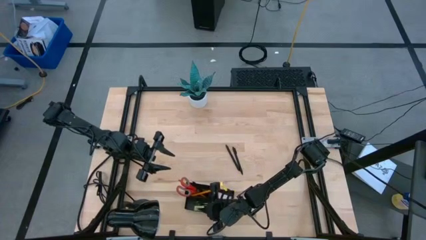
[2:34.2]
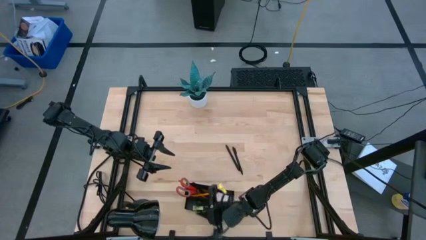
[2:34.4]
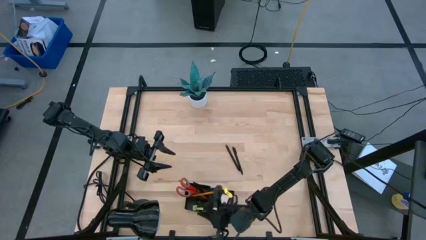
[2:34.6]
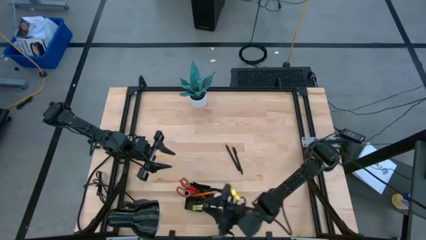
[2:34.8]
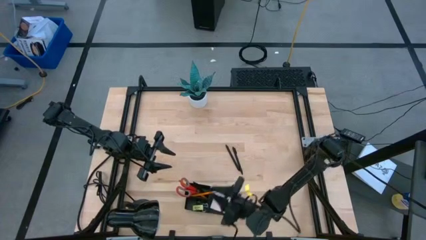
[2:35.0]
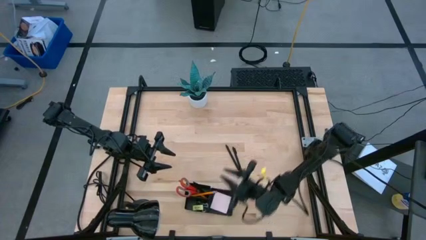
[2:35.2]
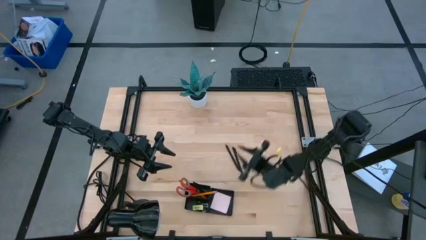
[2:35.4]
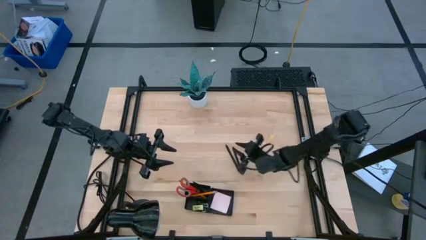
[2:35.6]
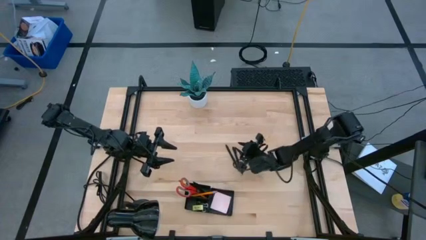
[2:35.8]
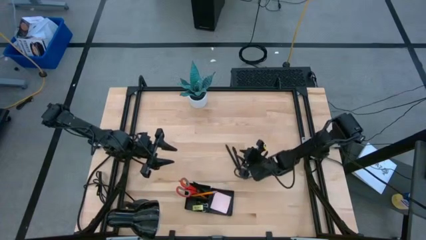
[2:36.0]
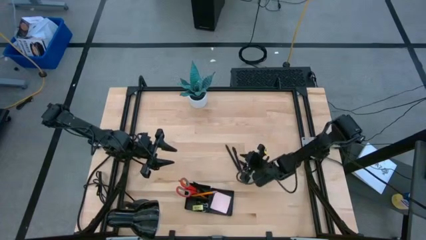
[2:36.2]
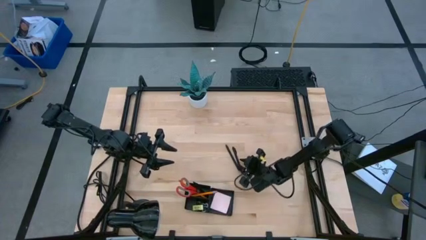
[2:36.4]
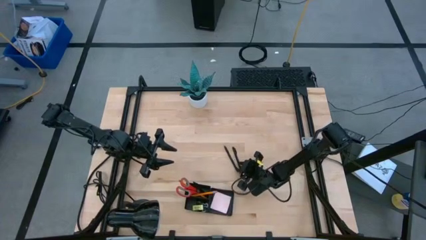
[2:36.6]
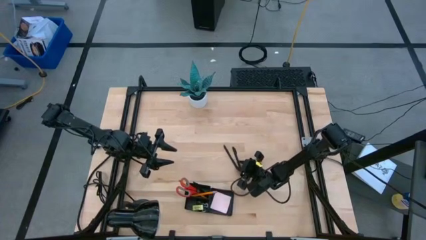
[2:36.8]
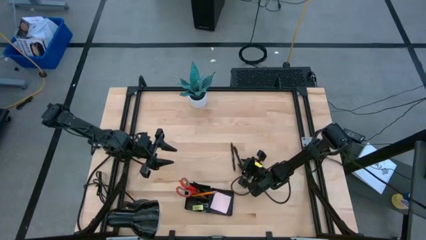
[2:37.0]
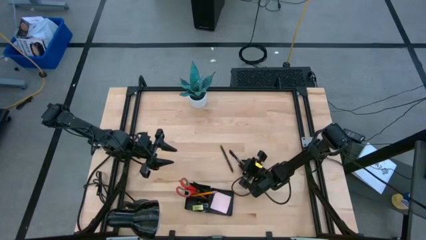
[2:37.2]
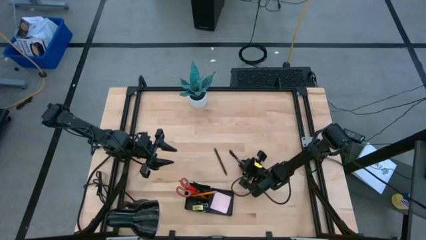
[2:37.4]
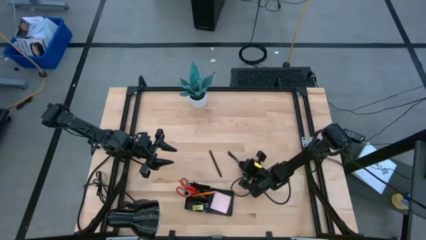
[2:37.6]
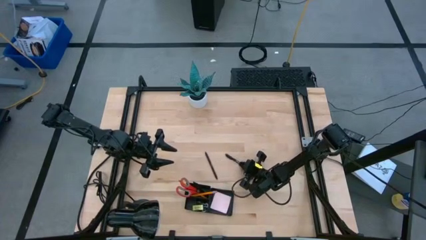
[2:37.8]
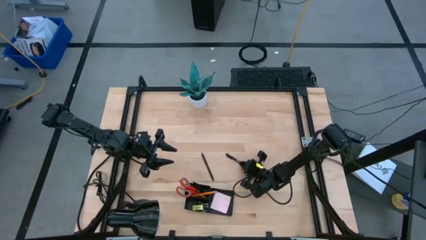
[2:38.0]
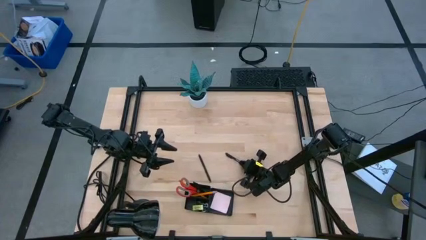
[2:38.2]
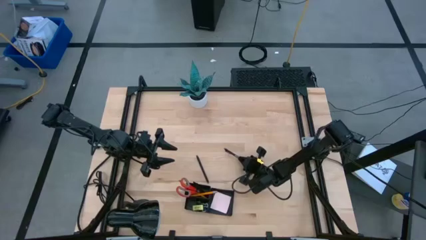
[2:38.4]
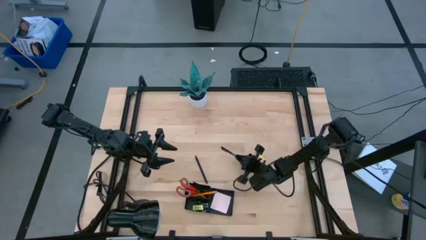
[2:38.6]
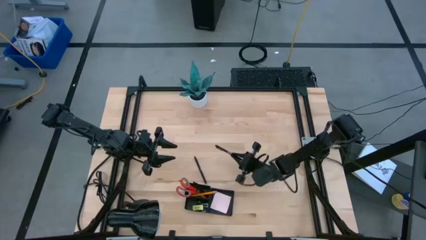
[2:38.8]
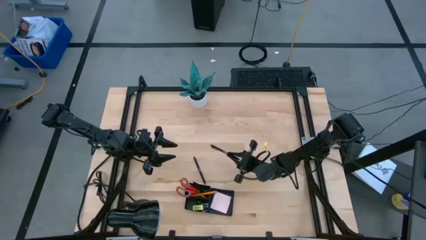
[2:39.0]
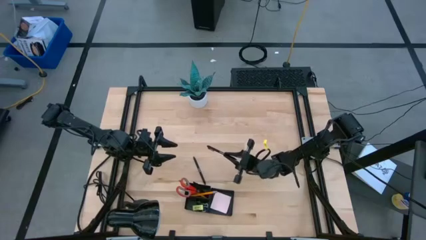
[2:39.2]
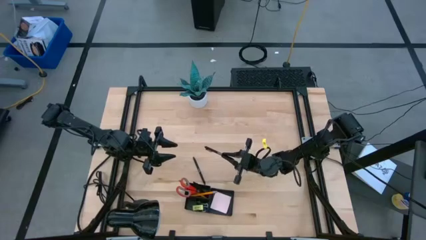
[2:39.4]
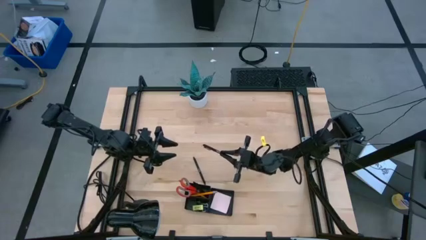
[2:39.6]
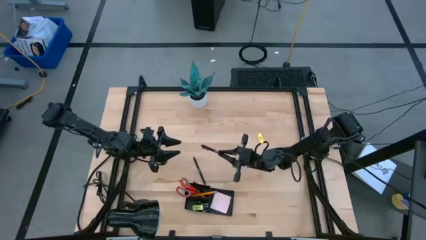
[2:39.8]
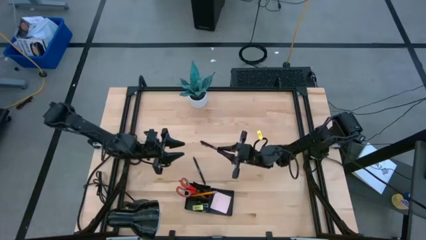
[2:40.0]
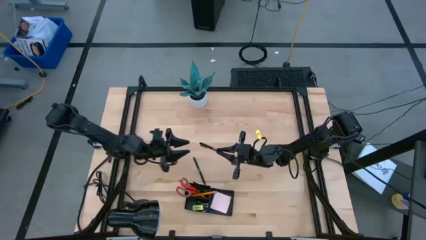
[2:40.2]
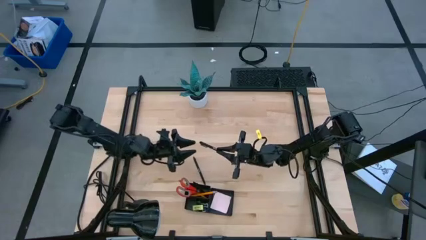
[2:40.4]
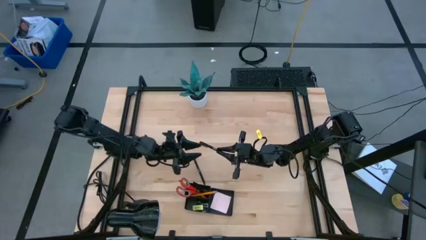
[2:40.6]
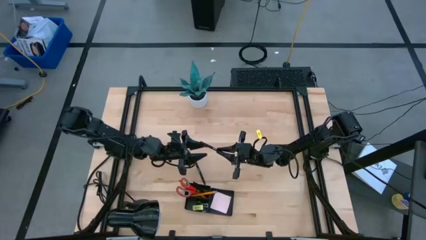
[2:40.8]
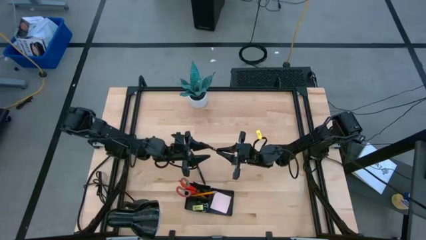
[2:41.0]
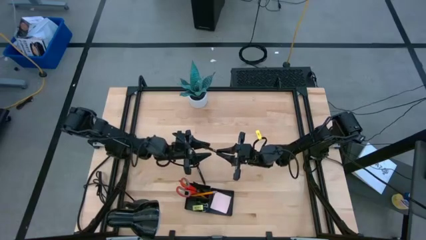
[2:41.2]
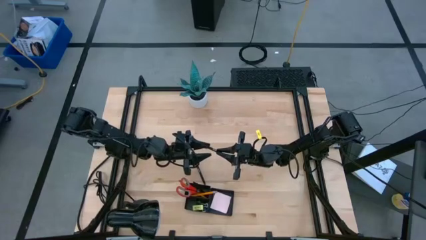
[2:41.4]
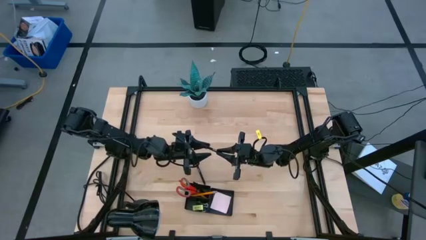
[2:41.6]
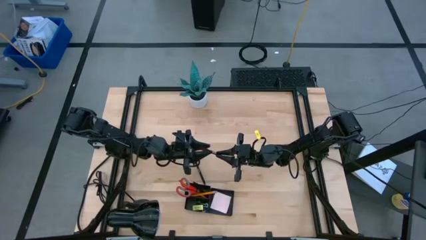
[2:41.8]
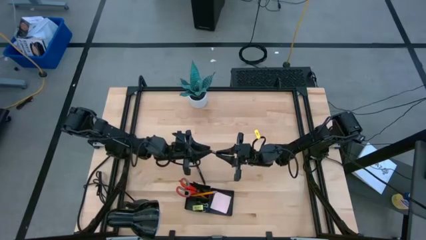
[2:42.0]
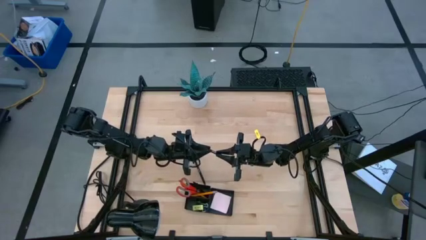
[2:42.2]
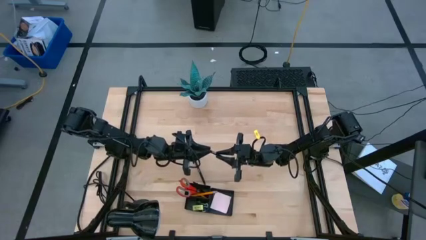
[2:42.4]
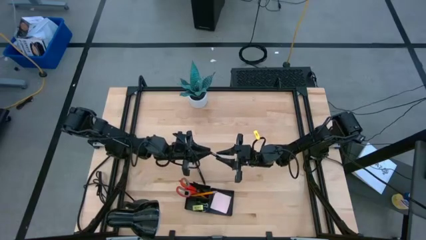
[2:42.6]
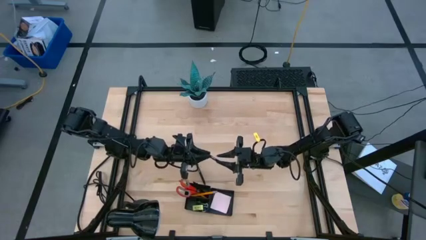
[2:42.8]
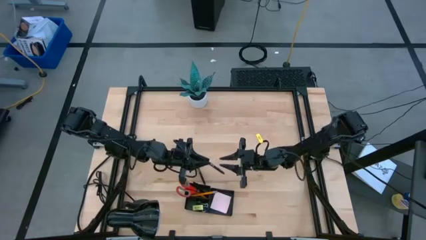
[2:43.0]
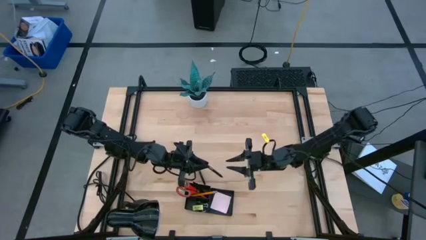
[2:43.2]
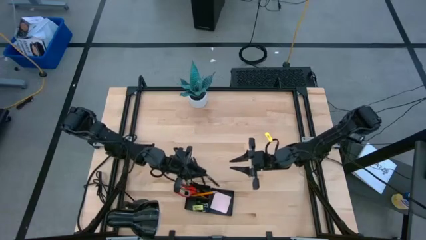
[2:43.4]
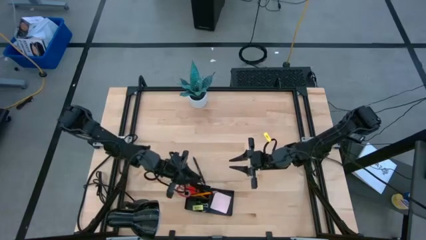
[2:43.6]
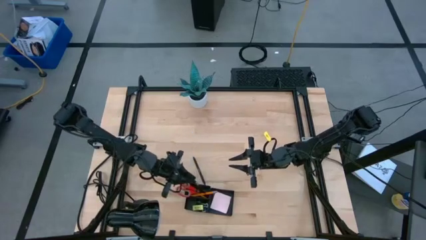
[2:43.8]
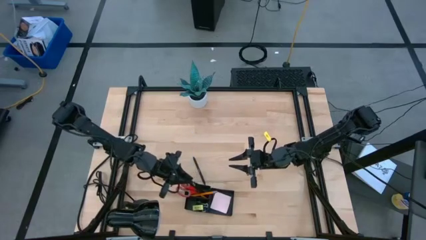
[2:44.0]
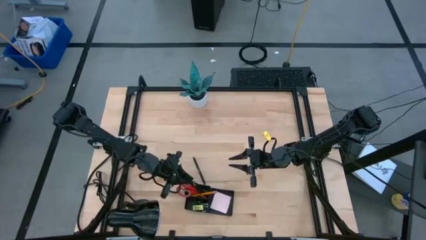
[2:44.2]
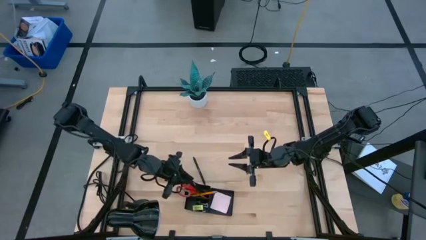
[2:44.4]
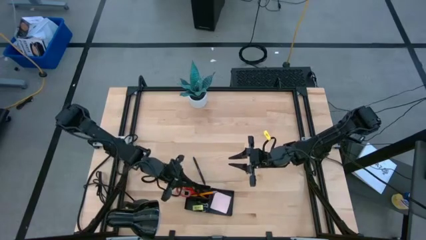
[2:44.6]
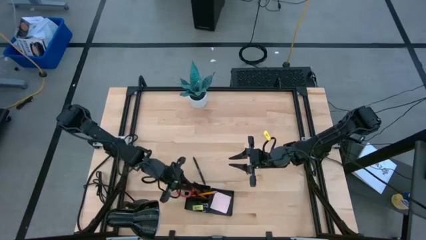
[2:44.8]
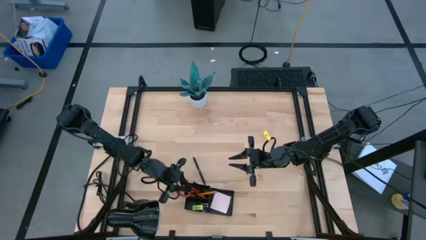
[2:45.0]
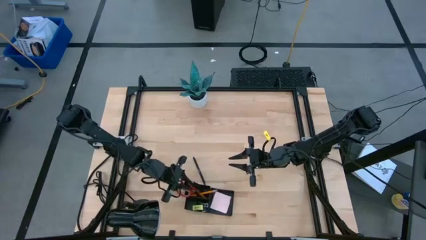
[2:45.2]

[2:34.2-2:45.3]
Task: Pick and place office supplies into organizer
Put the black pen into the black desk organizer

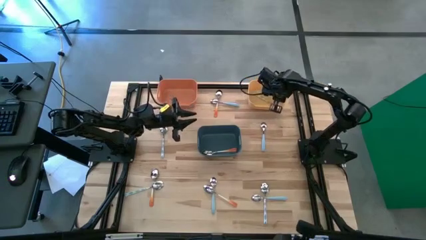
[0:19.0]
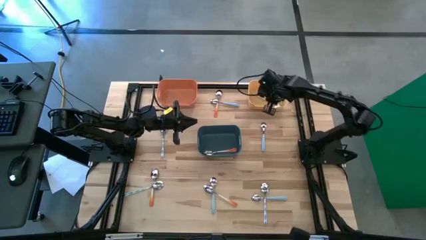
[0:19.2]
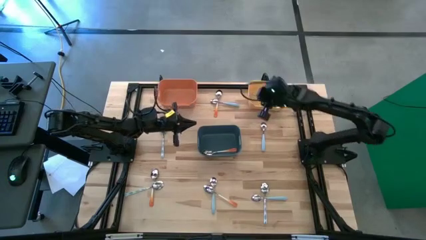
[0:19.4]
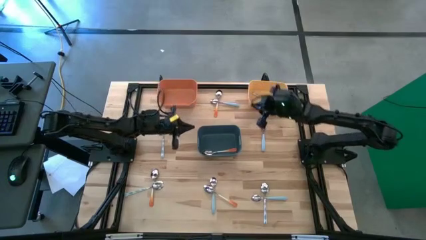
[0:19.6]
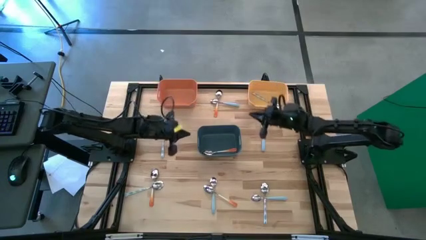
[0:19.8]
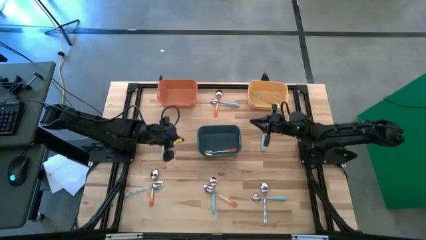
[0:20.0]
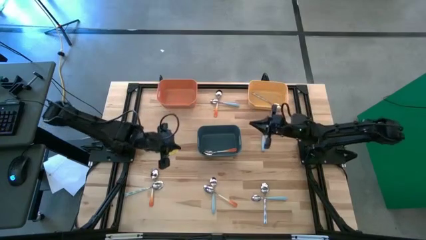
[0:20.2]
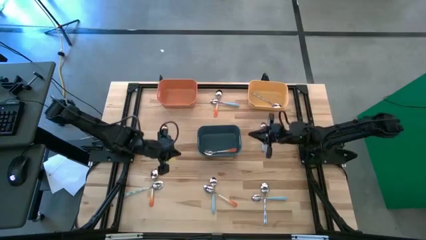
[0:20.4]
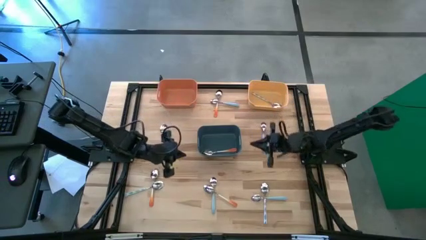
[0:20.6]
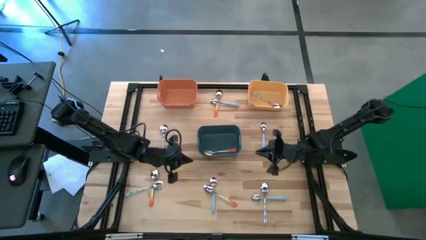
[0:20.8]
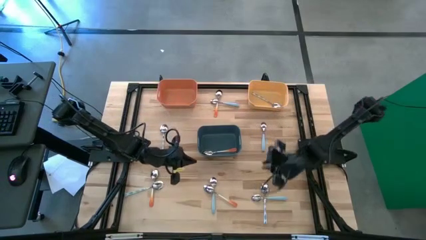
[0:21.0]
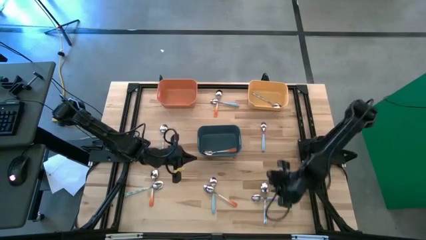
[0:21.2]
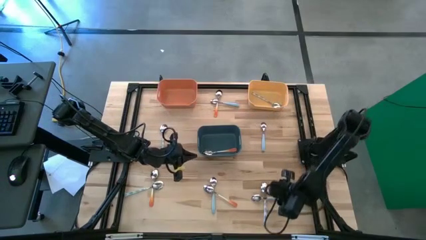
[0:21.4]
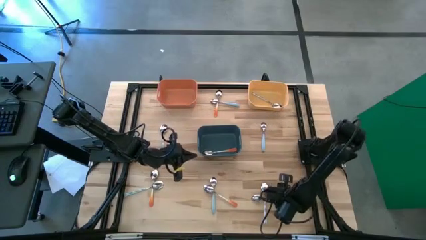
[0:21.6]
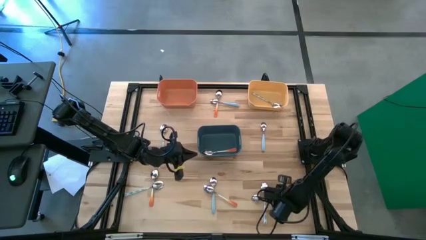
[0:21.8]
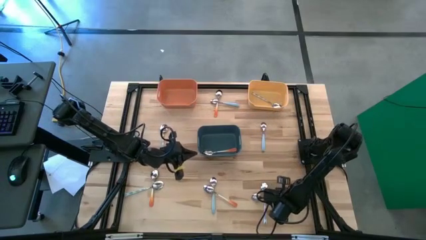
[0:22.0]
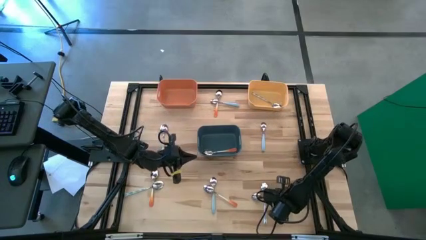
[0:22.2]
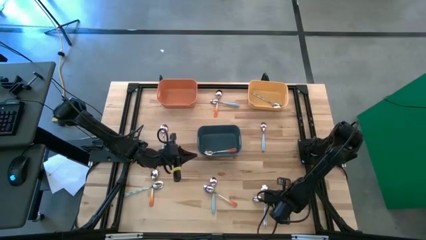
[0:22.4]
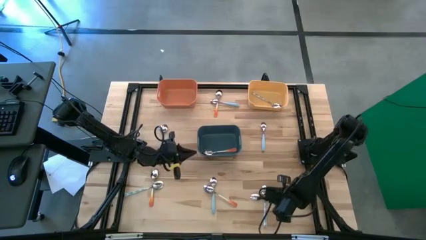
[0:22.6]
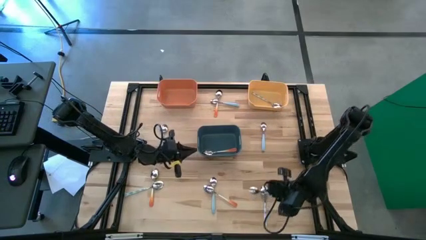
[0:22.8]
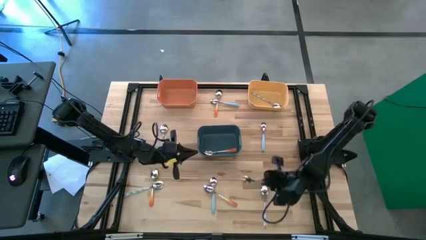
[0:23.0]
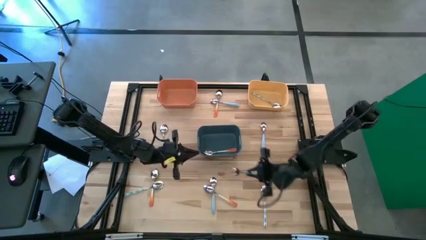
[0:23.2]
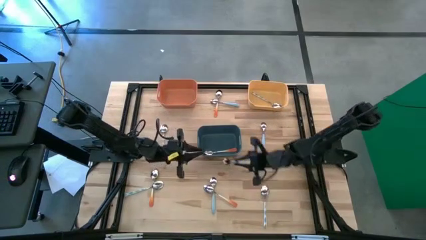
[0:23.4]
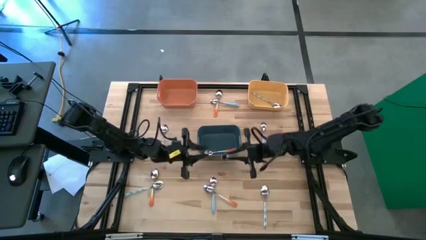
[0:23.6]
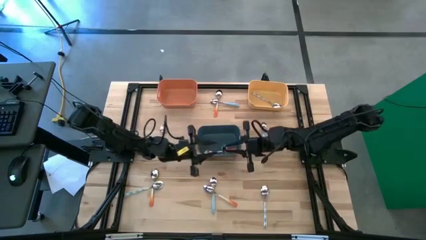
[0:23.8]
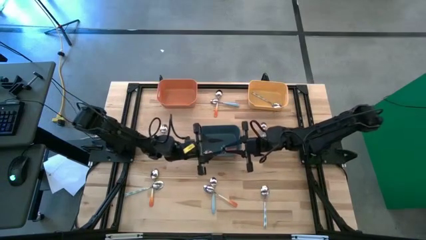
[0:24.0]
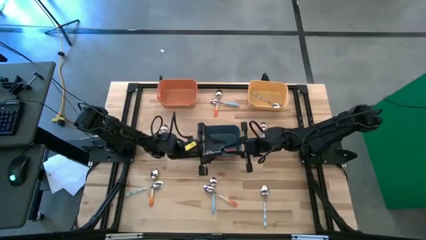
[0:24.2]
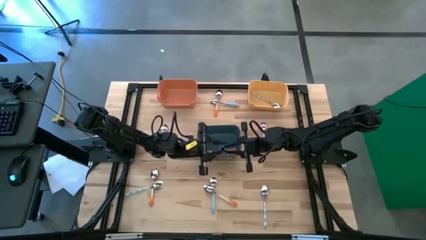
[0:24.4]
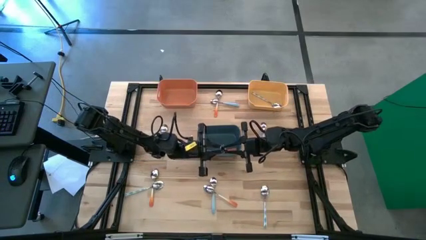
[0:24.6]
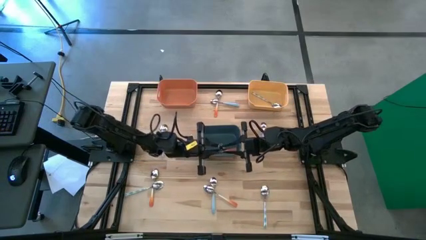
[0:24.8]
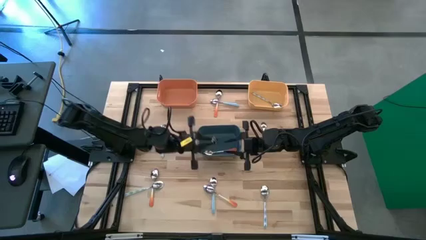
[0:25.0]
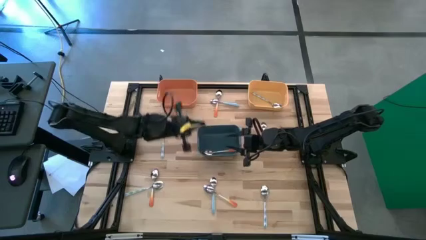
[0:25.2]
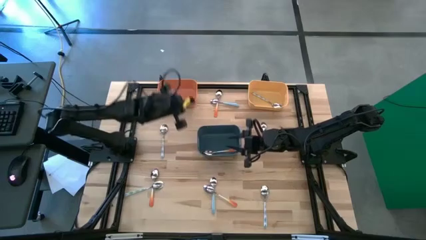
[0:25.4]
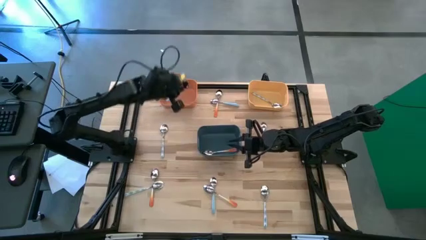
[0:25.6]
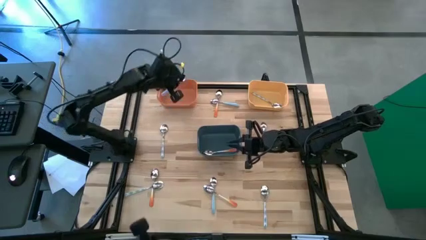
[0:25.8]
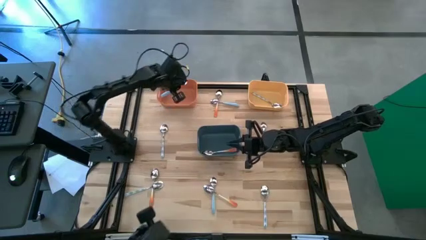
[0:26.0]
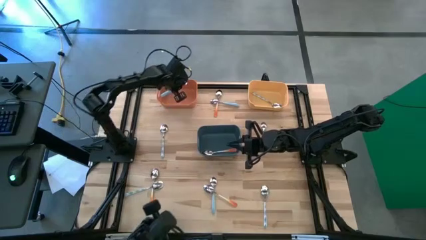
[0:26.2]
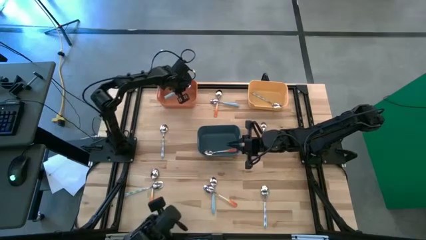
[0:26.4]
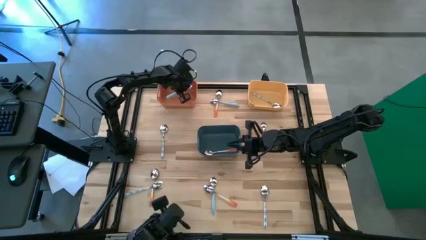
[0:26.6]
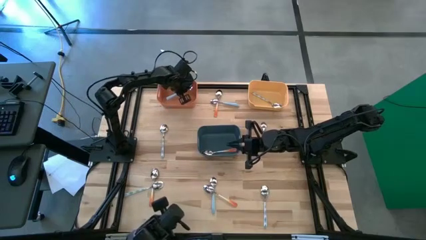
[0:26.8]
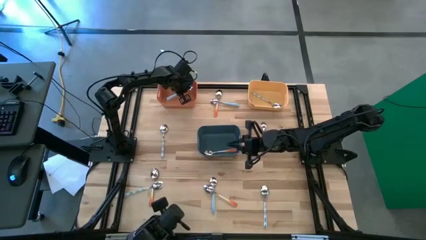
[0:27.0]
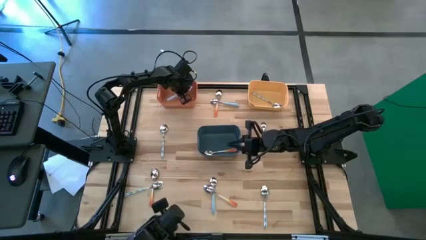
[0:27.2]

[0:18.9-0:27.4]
Task: Sort silverware by color (type)
Put the blue spoon into the orange bin
